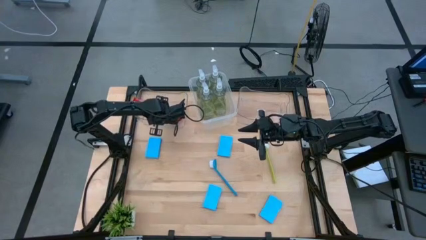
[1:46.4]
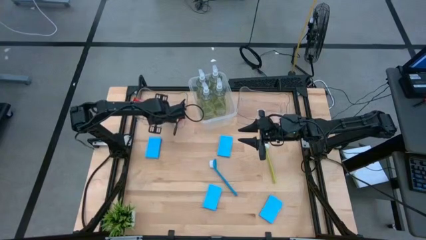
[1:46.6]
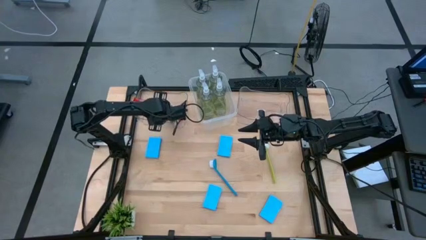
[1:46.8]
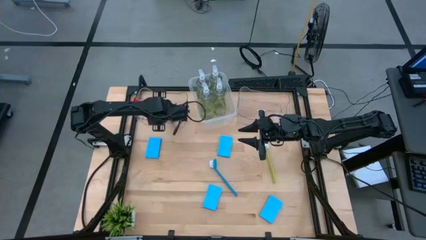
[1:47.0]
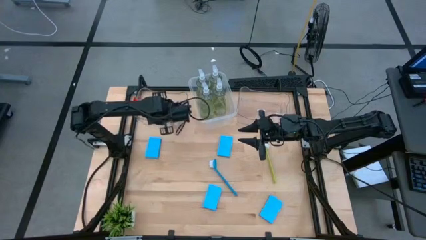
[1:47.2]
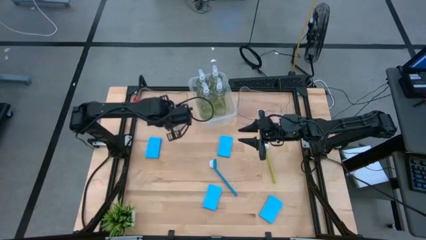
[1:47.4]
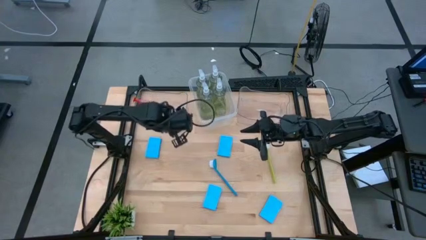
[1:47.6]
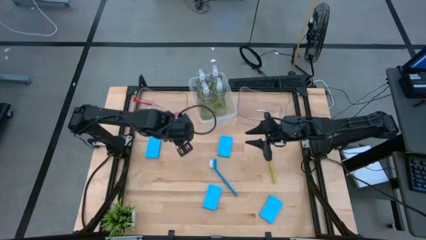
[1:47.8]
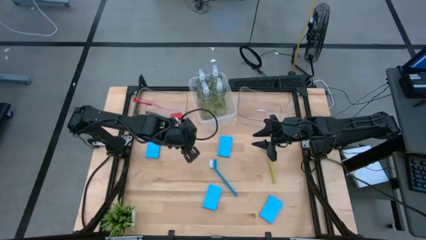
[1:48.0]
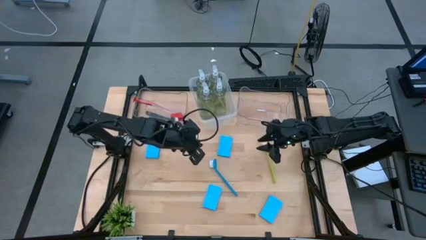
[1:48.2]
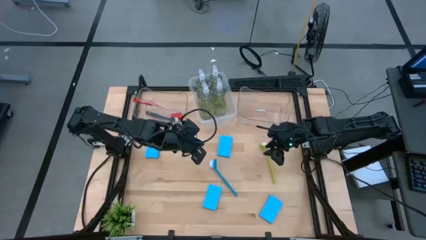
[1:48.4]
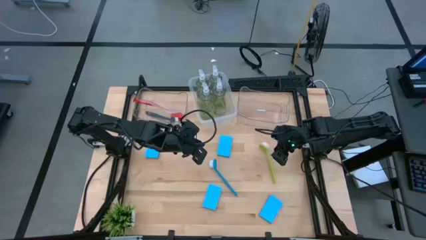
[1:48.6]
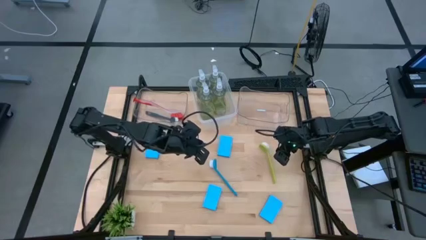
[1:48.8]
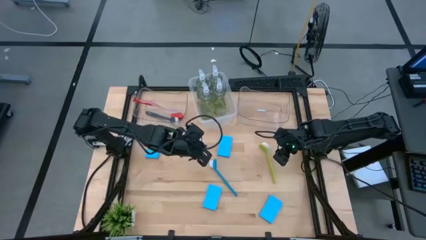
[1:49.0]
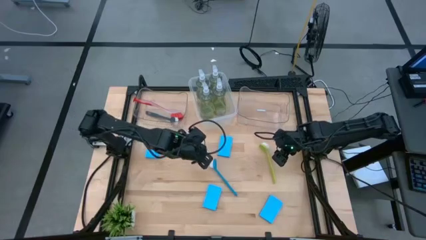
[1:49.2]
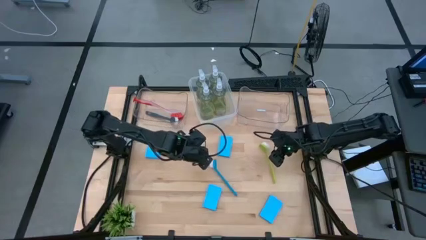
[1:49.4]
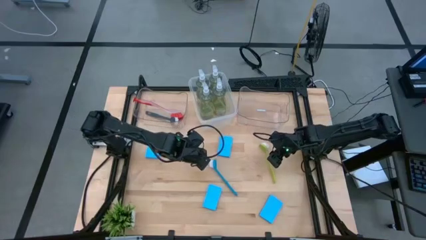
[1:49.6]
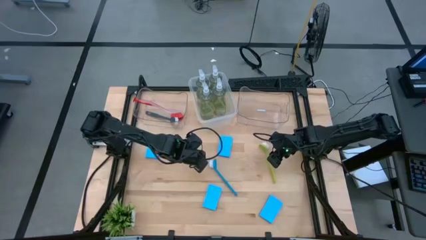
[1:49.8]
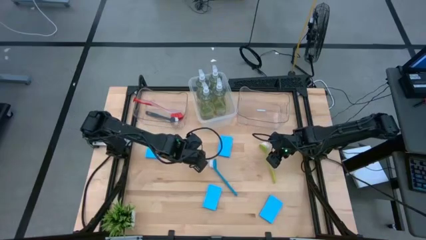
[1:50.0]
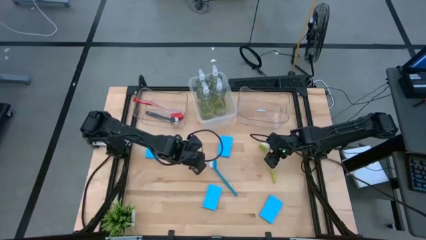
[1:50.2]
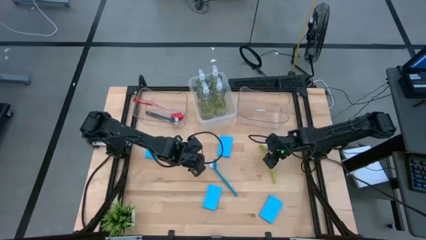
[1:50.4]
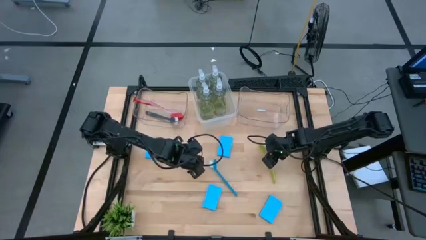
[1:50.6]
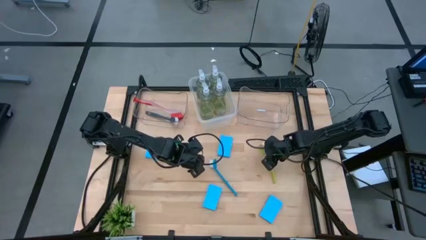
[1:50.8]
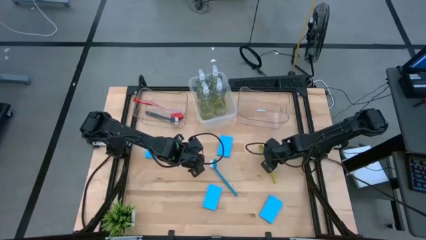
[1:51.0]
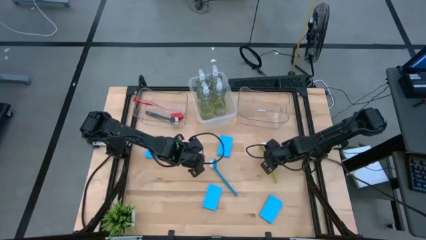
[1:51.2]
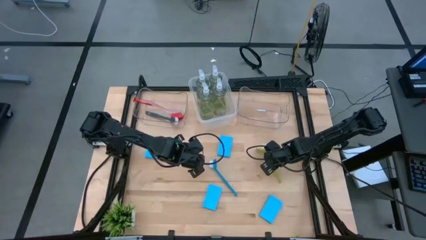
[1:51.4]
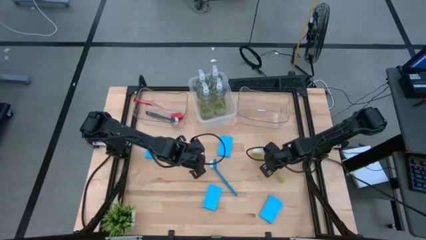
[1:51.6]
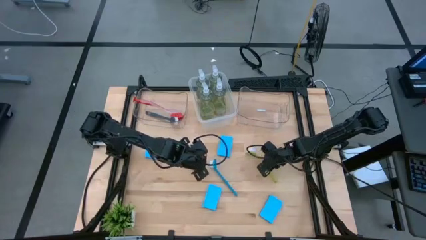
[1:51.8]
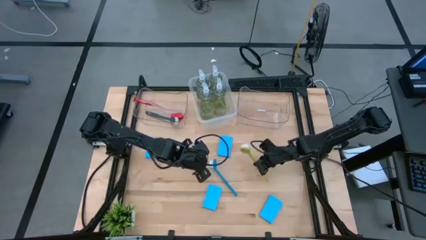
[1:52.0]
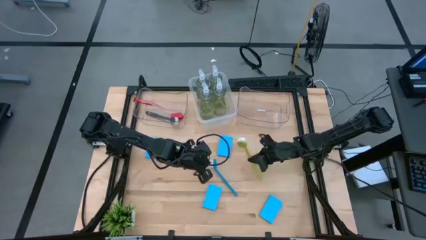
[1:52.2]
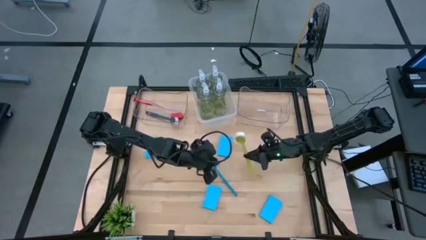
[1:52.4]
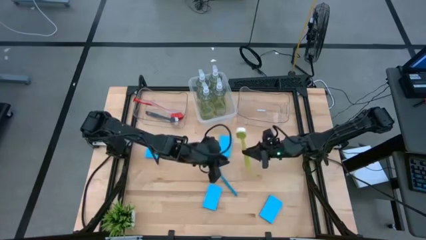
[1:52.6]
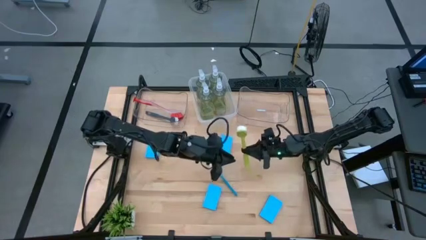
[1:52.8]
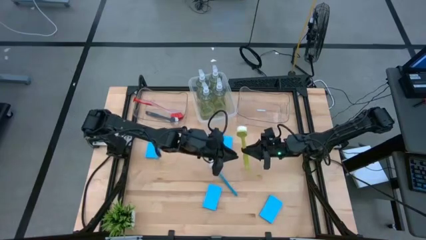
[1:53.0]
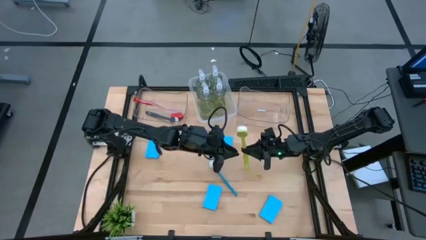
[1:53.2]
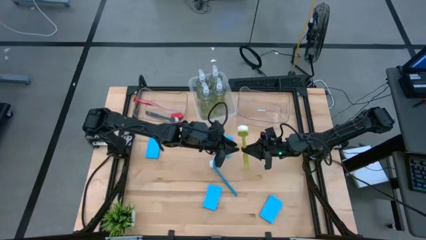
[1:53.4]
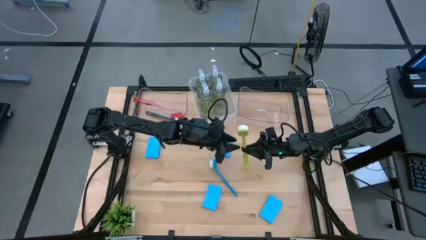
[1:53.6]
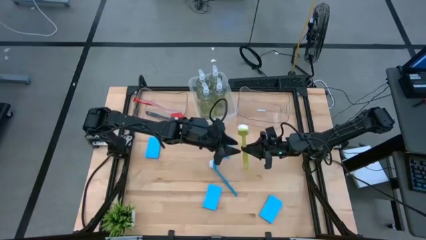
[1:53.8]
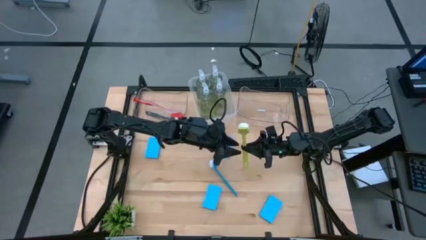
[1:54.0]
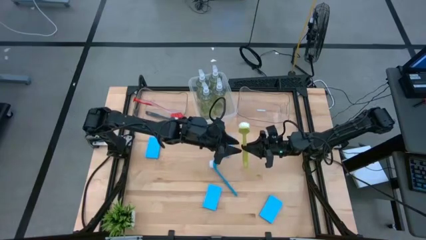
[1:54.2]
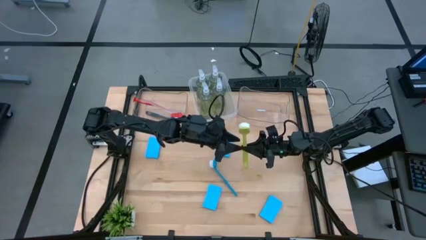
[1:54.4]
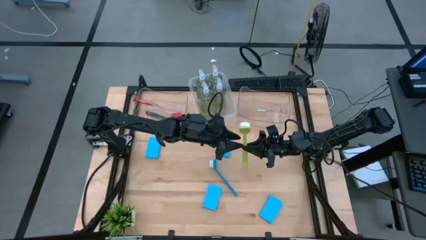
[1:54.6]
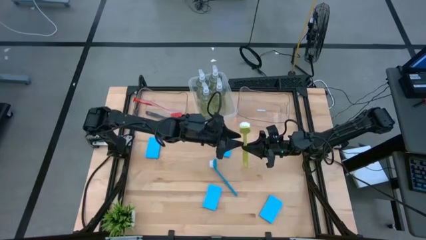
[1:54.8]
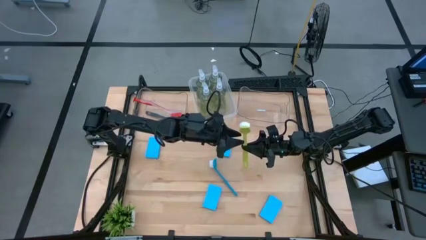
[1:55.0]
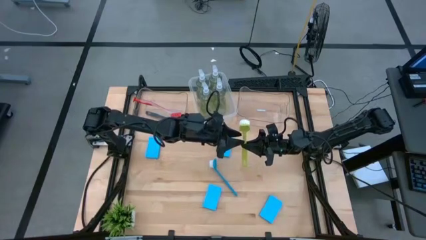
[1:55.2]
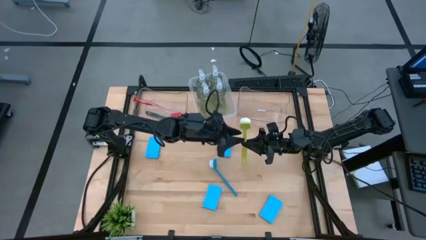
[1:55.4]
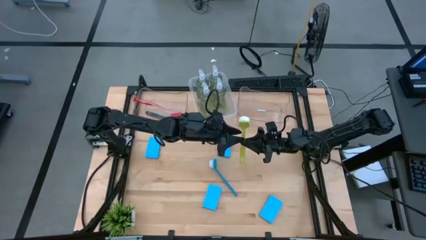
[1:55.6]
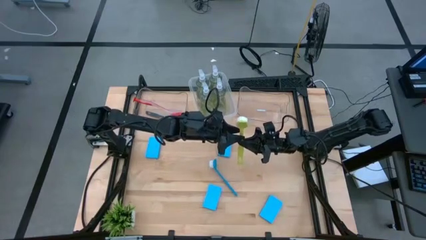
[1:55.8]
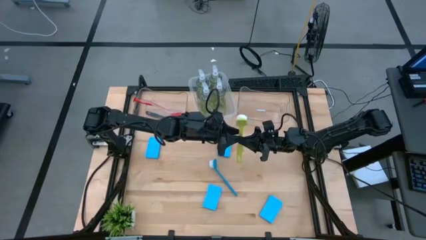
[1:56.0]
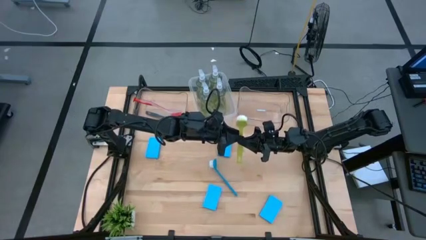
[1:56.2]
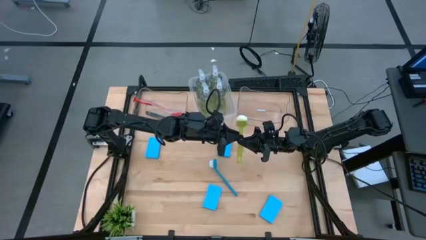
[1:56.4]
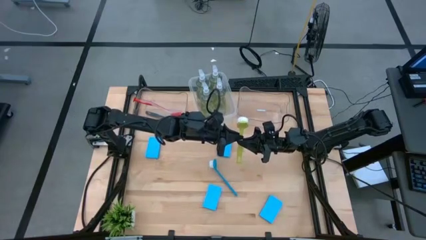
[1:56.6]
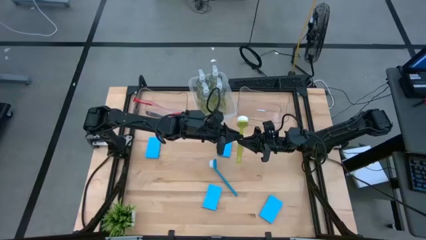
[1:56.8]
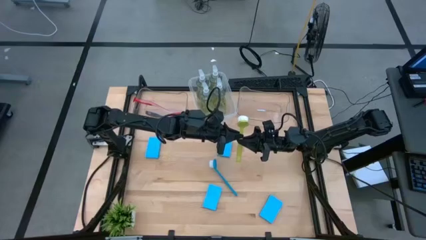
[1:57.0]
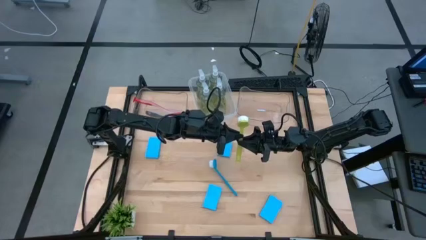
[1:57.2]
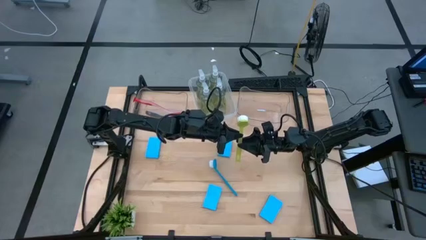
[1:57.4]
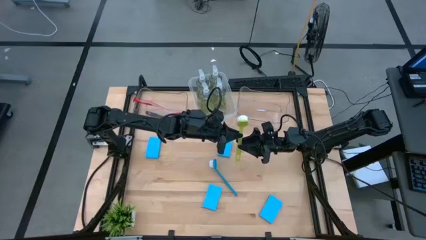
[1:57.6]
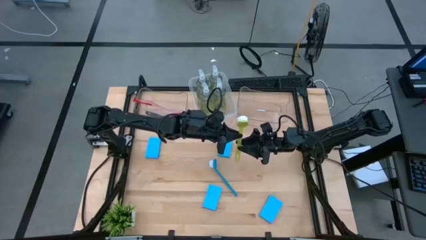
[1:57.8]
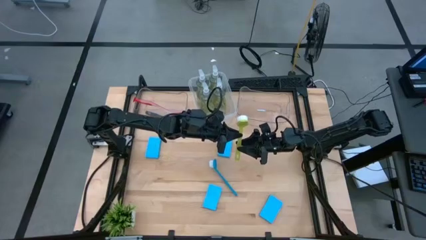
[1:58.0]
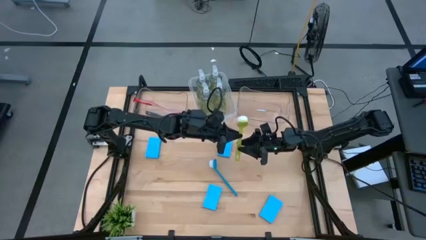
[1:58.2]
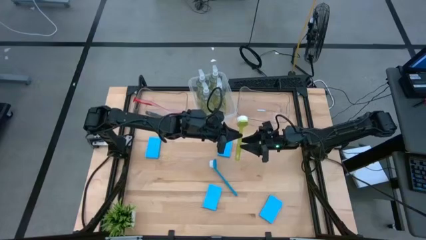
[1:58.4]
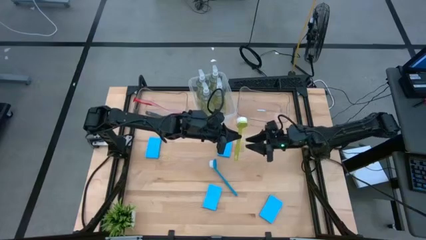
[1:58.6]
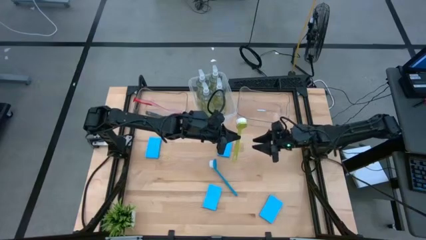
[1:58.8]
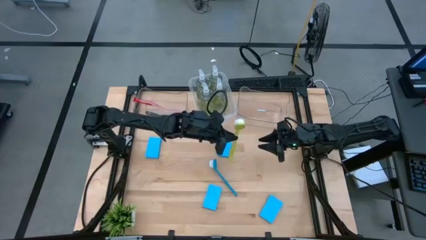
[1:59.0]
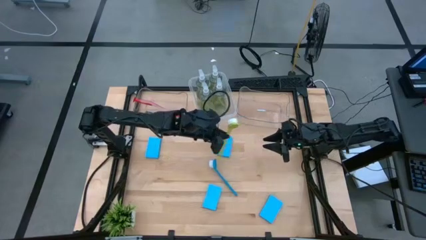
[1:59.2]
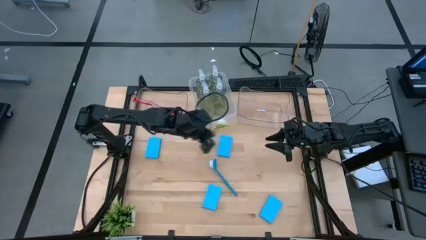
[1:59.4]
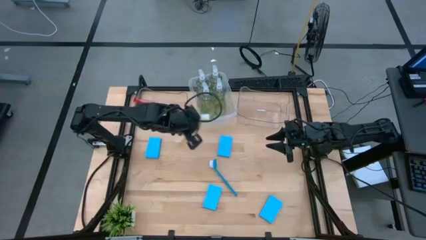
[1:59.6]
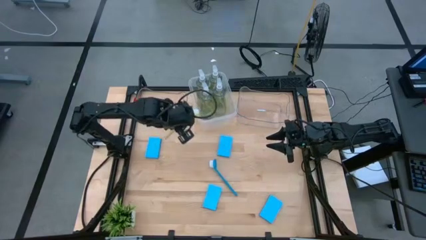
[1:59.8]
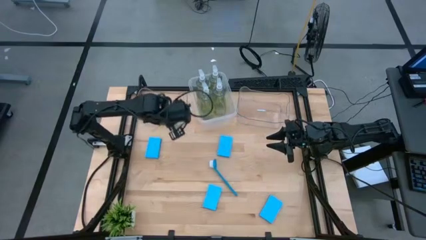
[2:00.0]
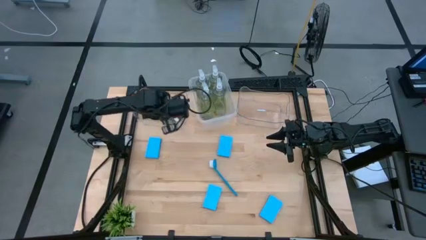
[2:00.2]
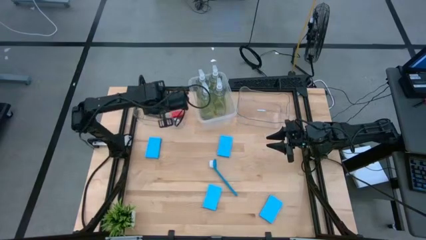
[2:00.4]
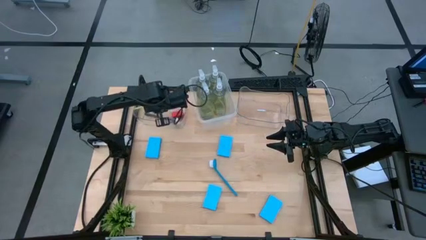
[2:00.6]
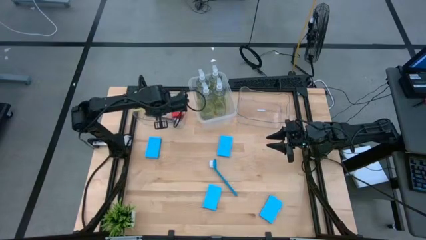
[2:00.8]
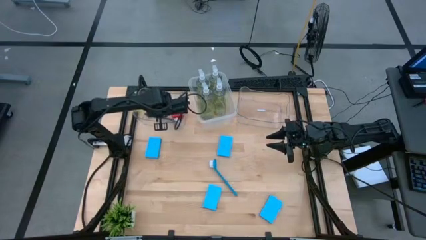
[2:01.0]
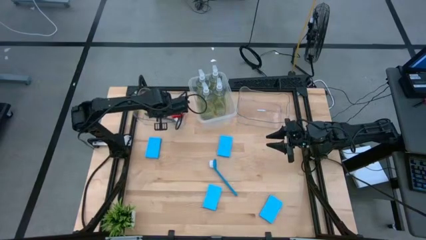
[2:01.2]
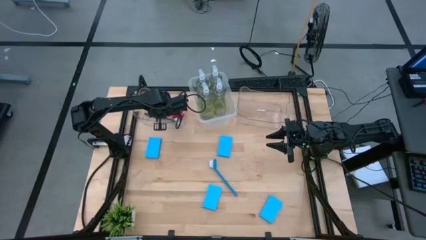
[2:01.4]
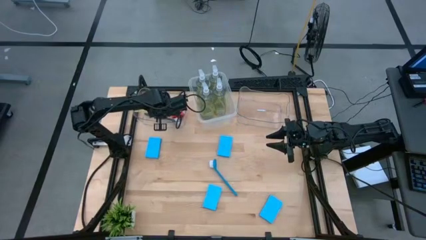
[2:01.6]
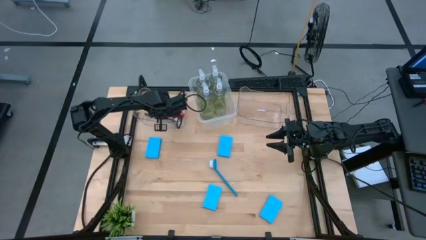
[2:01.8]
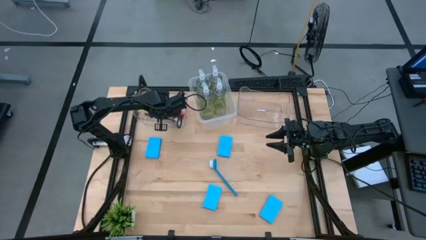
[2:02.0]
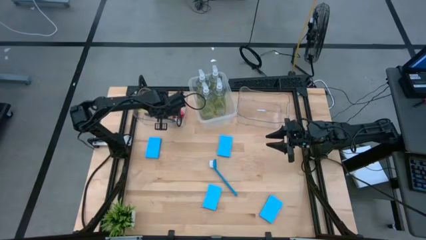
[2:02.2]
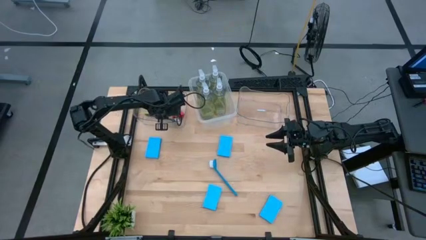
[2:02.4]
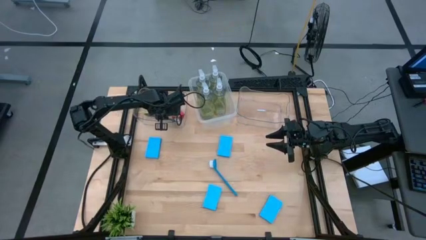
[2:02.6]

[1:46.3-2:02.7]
Task: Pick & Place Kitchen Sink Supplies
Put the green dish brush into the left transparent bin
